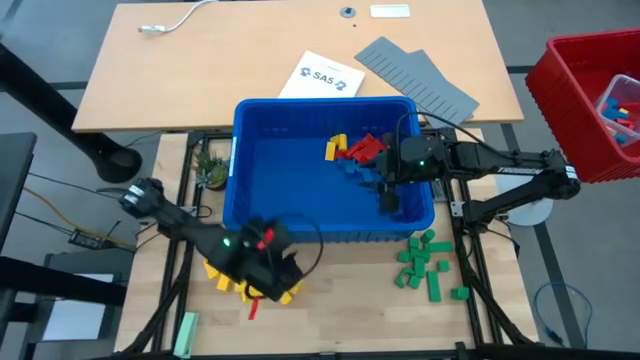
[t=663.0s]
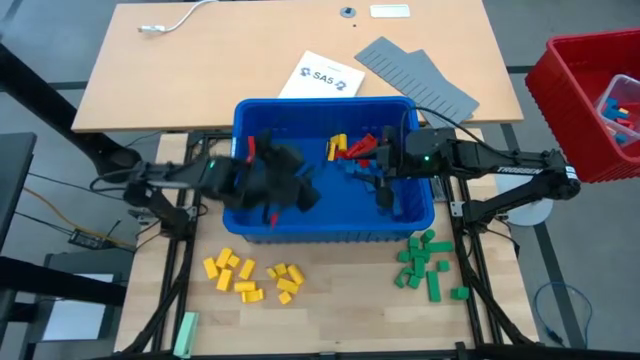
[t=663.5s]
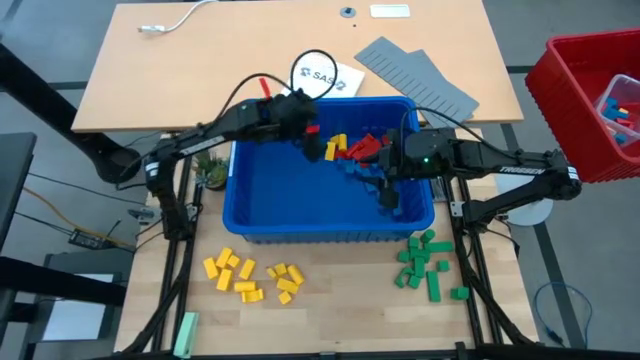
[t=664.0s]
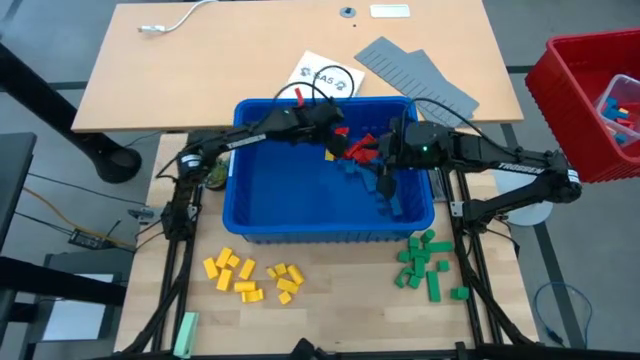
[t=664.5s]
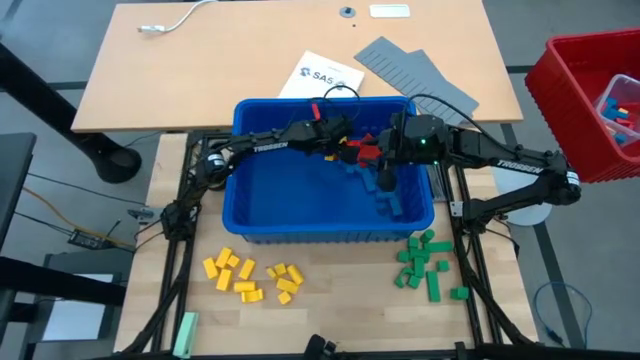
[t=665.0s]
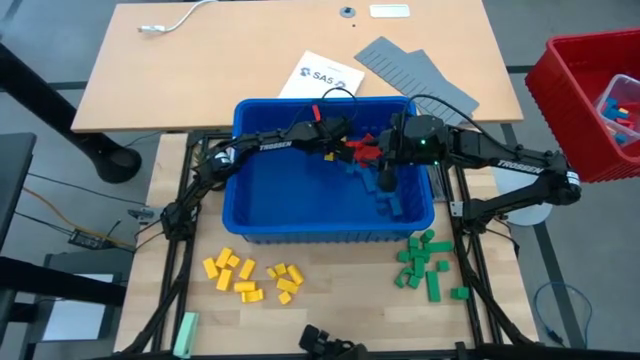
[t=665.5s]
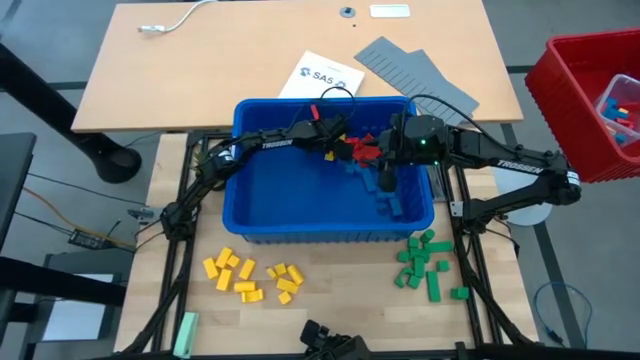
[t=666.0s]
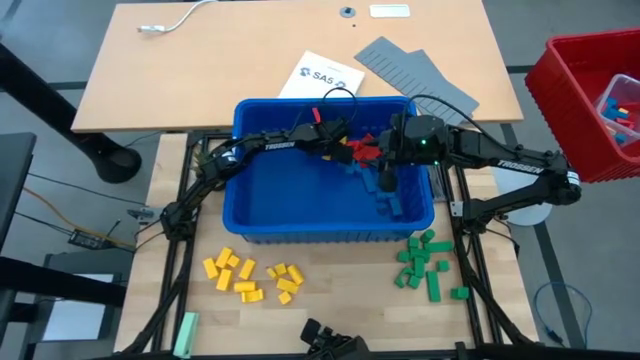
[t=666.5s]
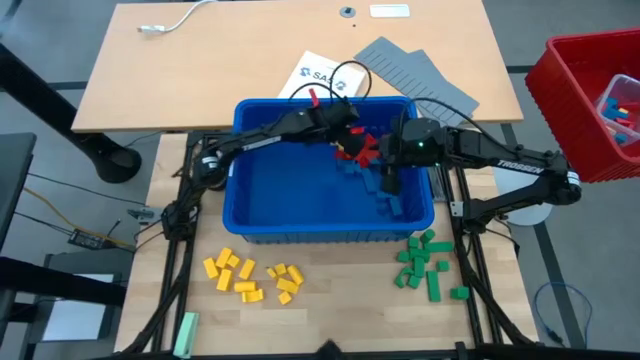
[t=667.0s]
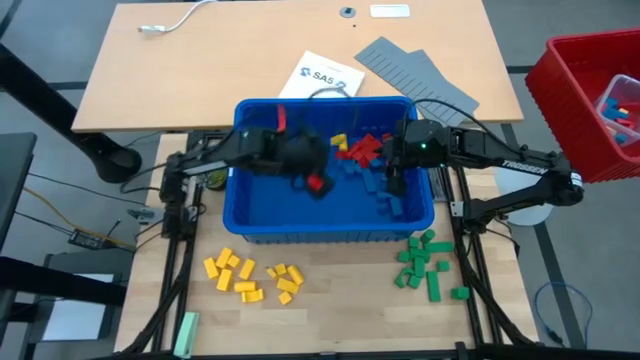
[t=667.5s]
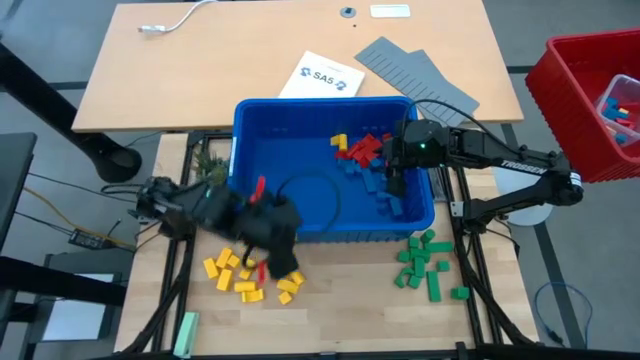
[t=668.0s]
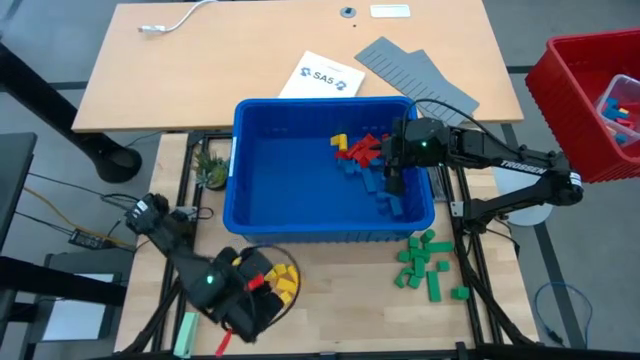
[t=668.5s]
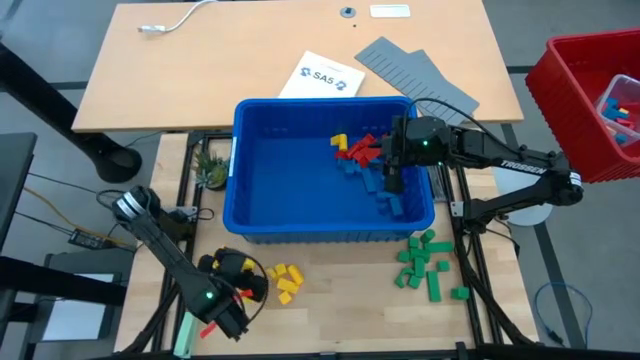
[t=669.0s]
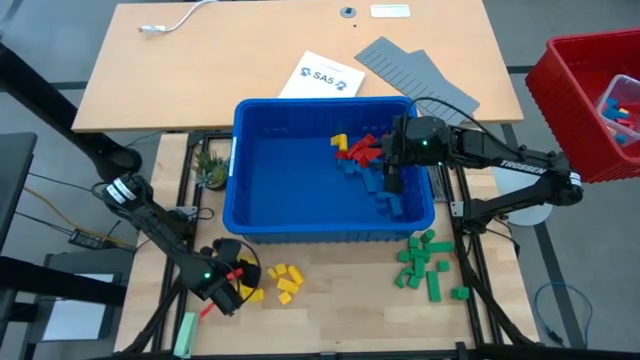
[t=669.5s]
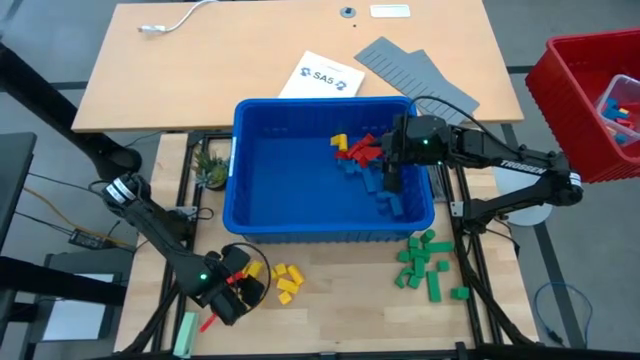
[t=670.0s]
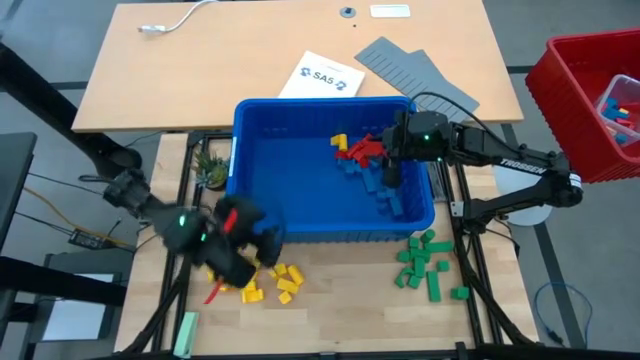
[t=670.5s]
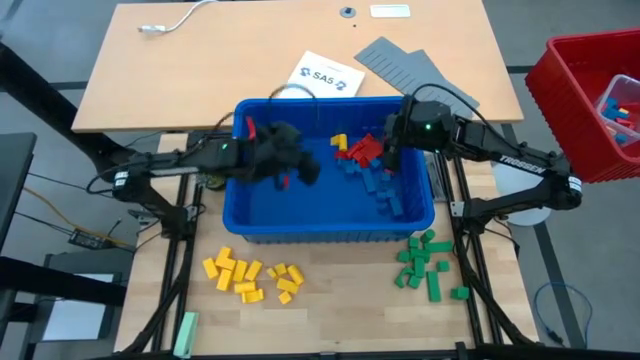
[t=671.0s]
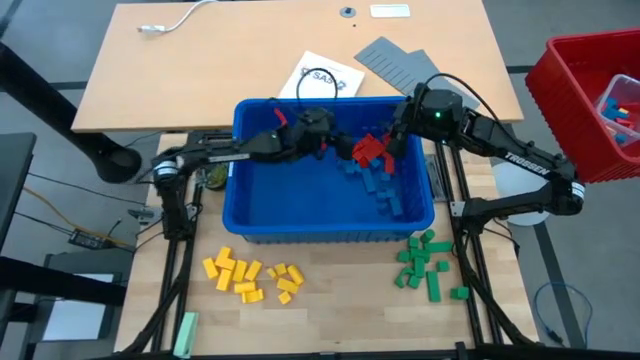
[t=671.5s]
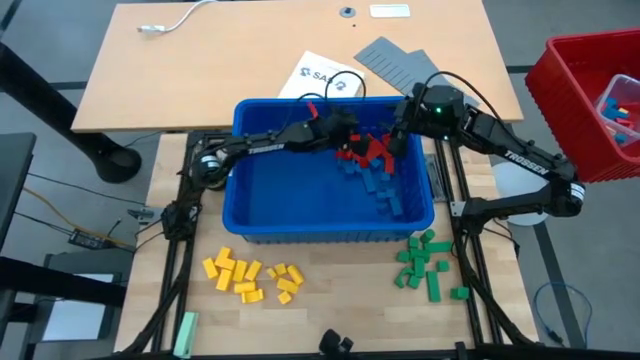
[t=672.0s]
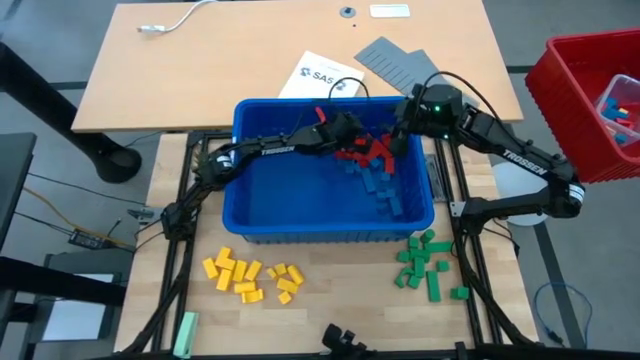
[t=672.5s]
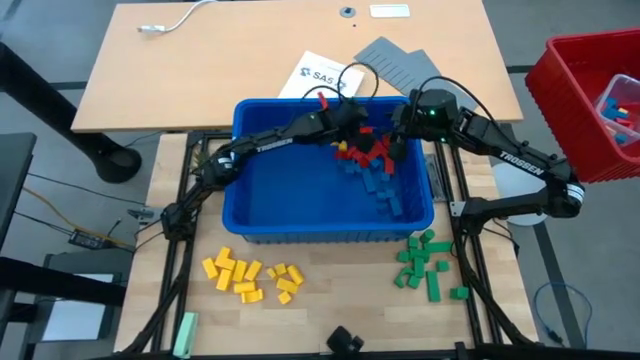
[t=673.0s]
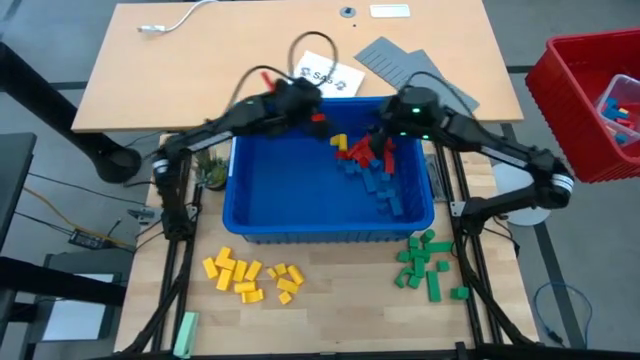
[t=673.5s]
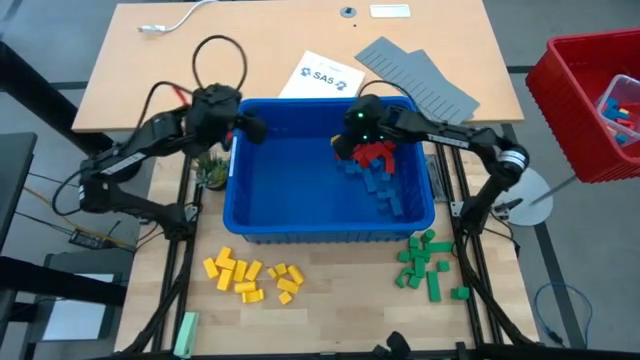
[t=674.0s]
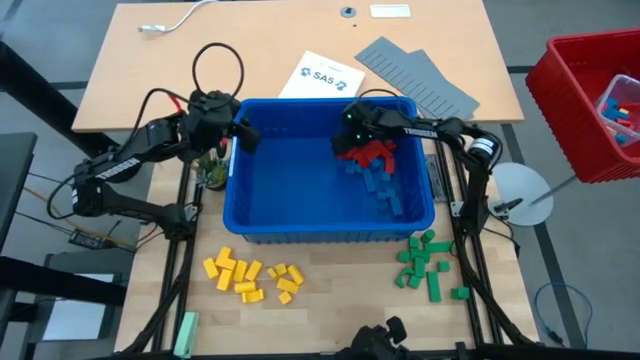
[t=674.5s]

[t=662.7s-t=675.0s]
Task: Sort blocks
Remove the yellow block from the blue bin

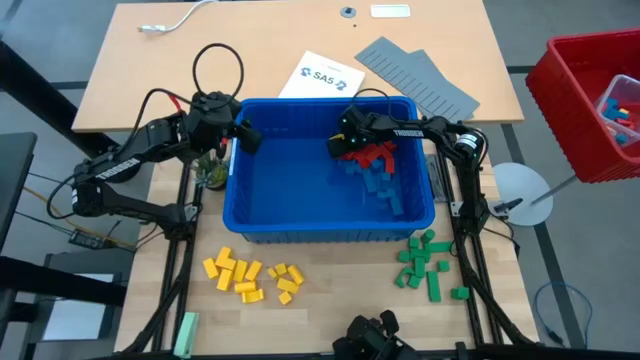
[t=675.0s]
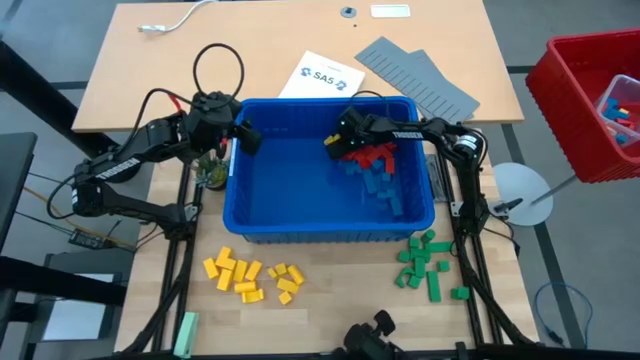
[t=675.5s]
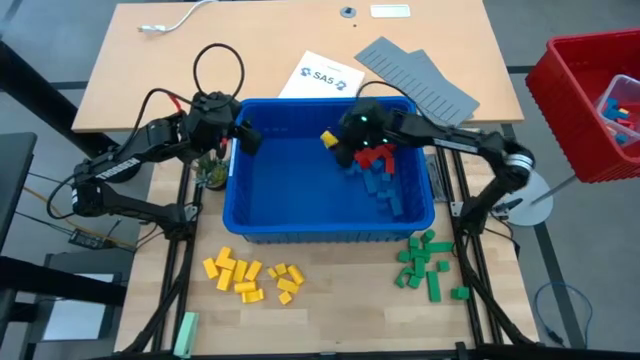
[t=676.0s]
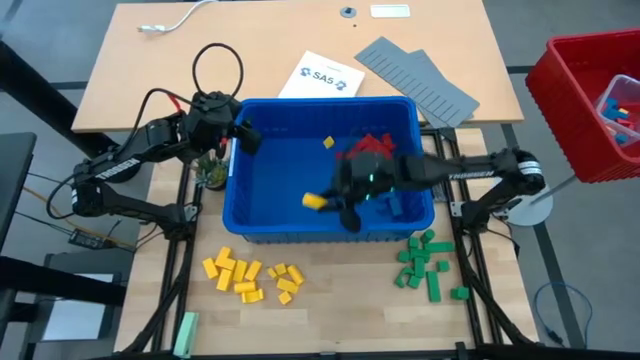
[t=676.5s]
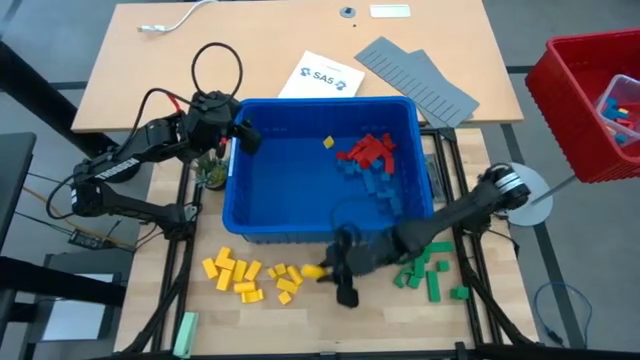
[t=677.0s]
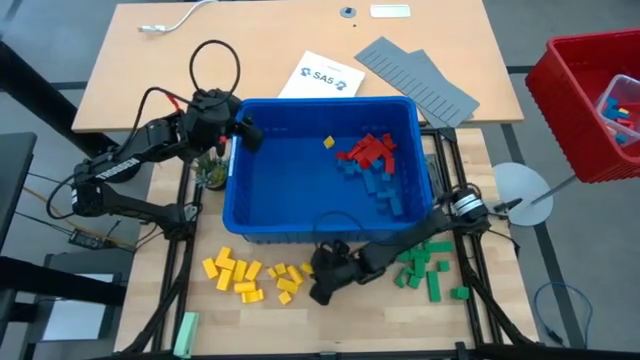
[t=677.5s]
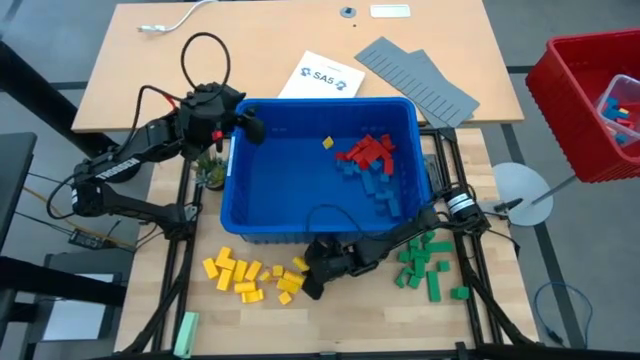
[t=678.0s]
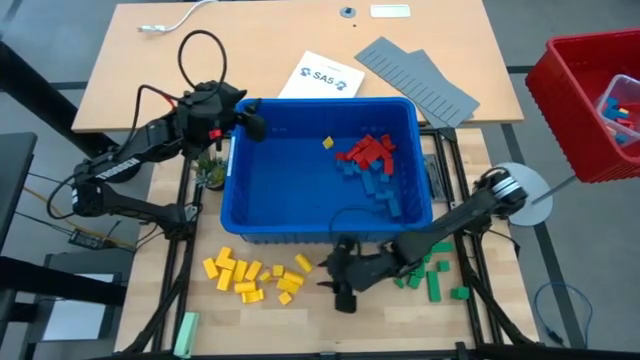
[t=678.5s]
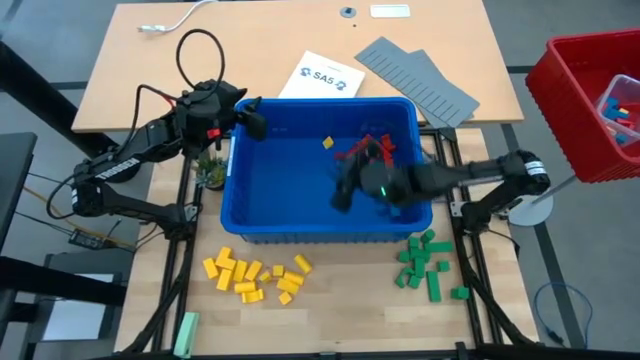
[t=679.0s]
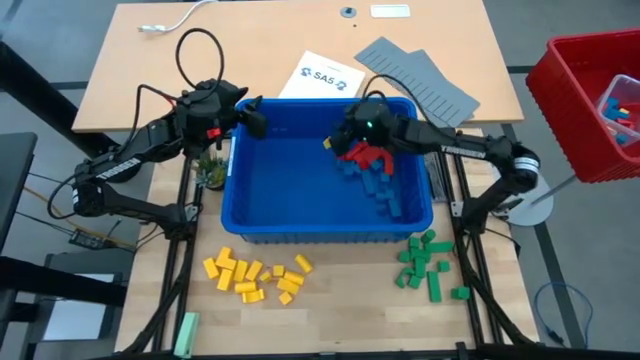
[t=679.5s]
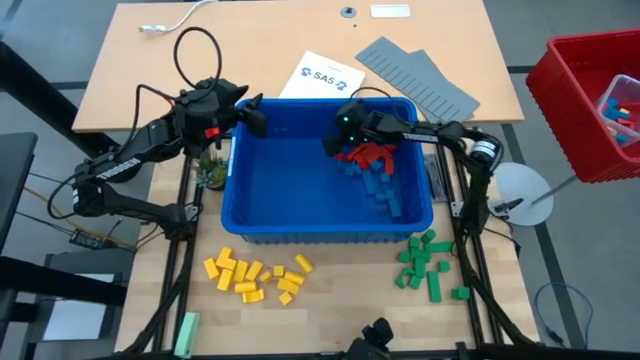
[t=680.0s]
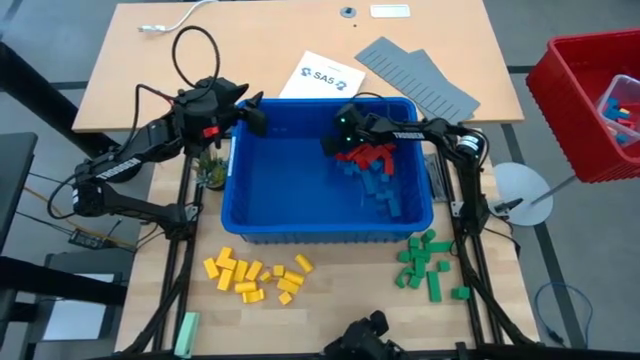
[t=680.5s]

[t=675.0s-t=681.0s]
Remove the yellow block from the blue bin
